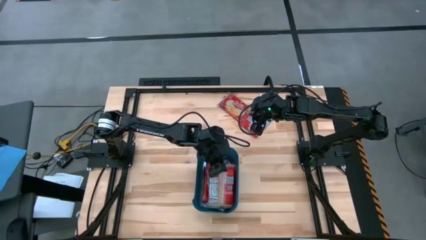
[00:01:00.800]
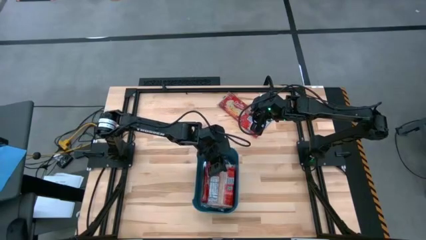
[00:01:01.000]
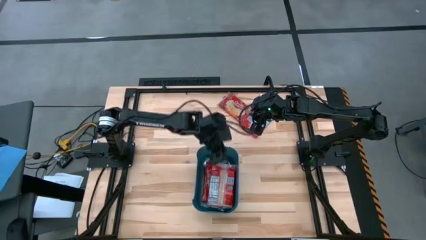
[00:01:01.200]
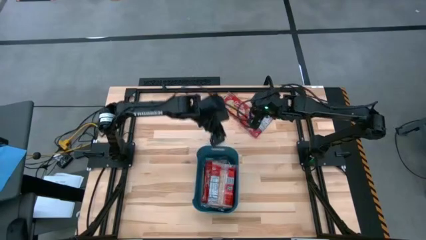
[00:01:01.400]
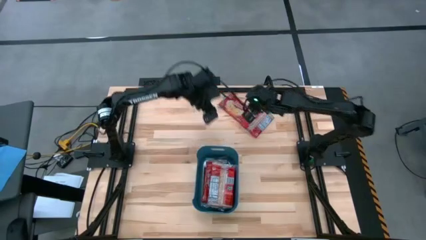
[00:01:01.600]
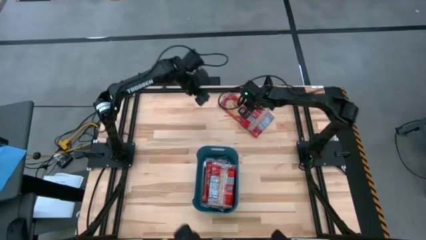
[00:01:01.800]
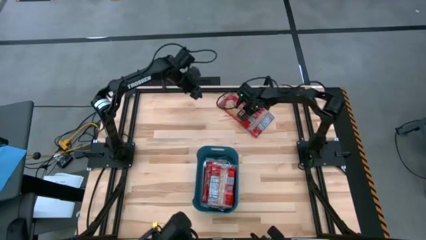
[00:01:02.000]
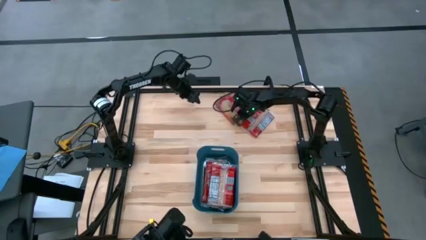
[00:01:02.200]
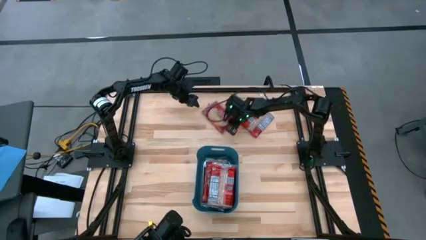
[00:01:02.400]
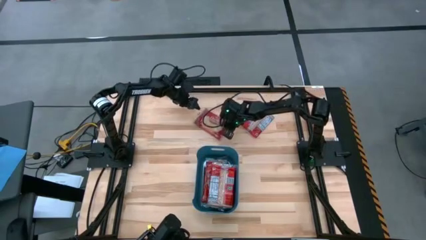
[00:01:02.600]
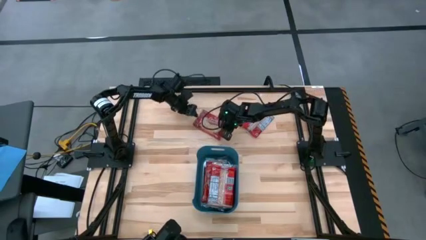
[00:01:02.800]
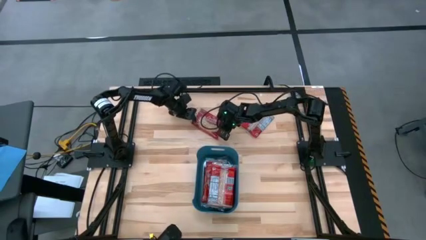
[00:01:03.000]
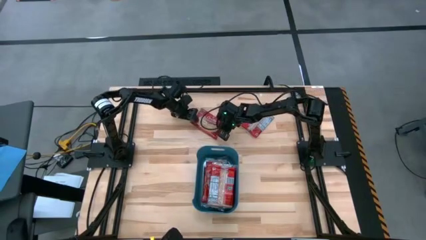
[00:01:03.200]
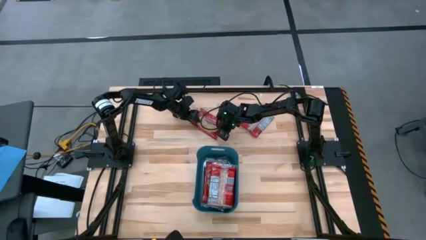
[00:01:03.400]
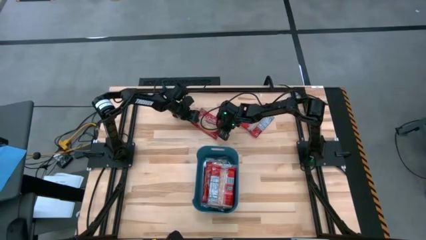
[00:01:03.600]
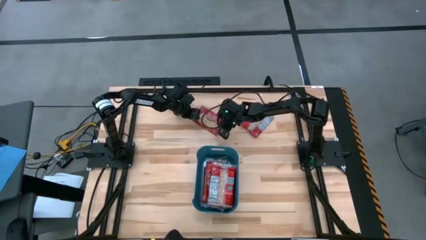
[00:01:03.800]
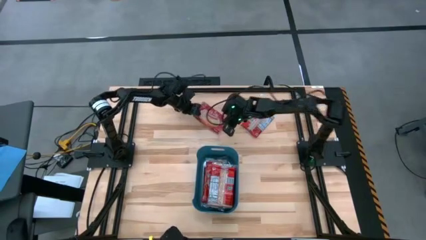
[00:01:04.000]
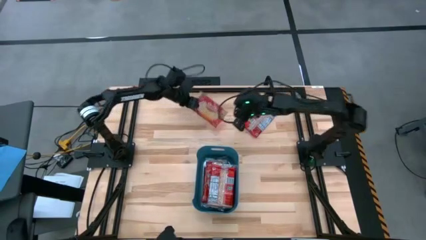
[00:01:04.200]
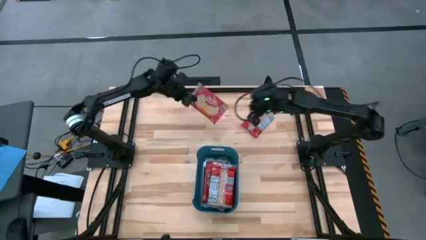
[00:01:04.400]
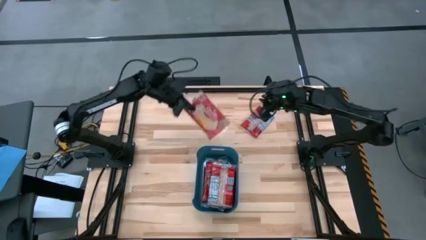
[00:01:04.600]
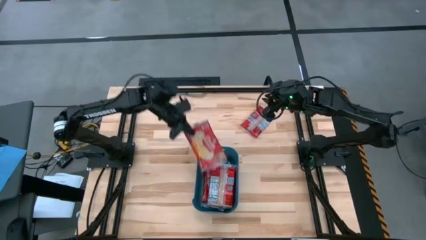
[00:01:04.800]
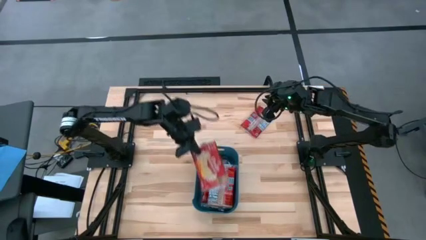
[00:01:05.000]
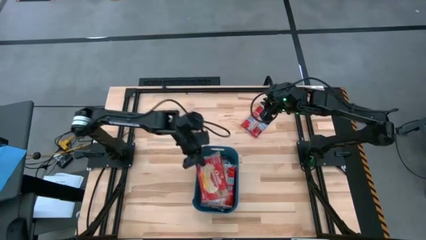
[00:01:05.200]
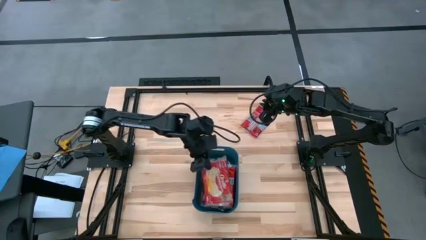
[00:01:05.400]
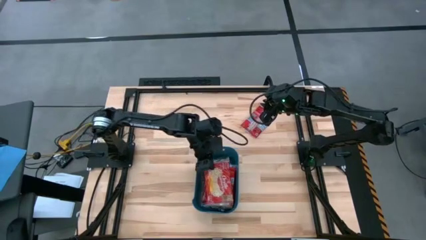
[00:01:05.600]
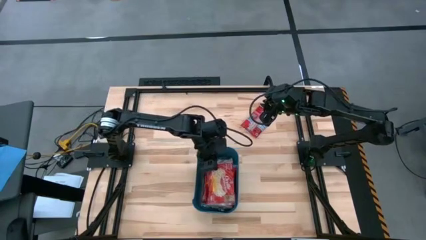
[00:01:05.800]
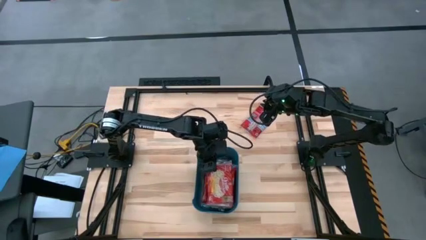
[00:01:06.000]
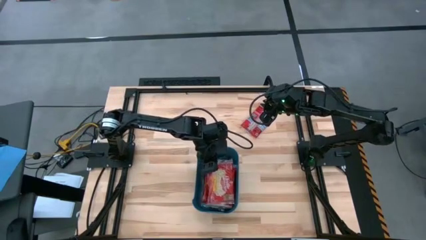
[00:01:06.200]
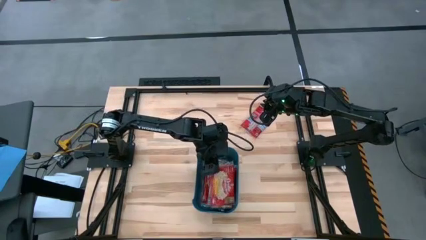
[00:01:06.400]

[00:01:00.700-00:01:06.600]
Task: Sort popcorn bags into baskets
Put the red popcorn pack into the blue container

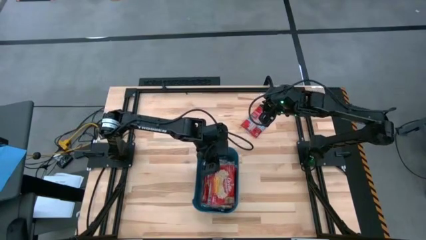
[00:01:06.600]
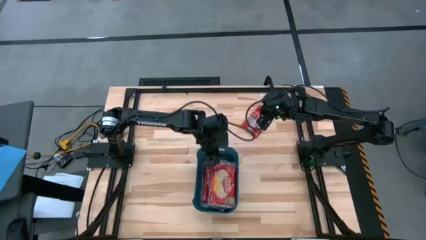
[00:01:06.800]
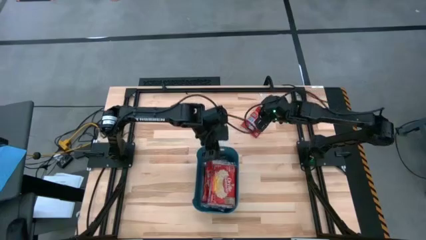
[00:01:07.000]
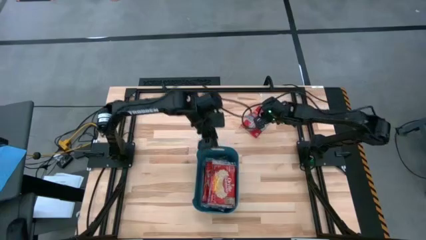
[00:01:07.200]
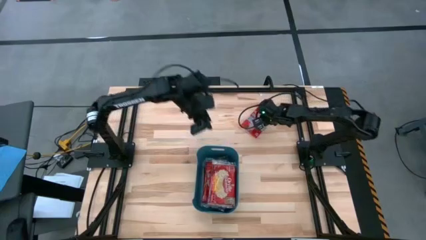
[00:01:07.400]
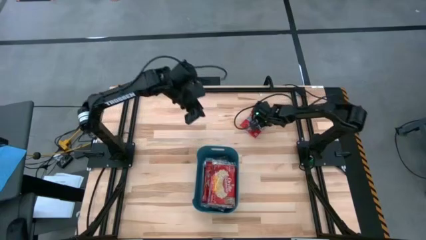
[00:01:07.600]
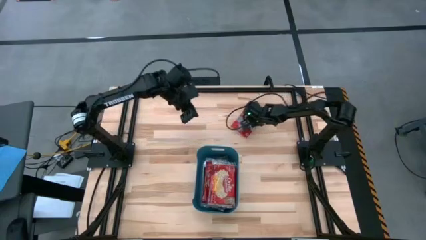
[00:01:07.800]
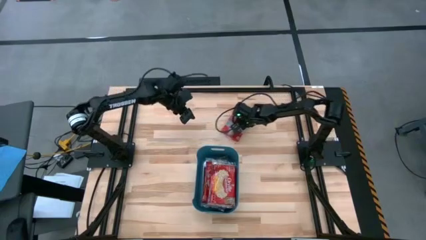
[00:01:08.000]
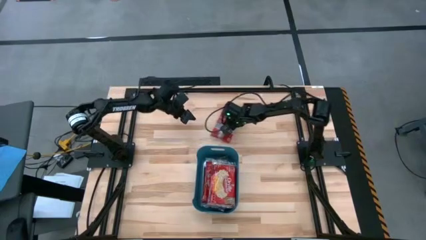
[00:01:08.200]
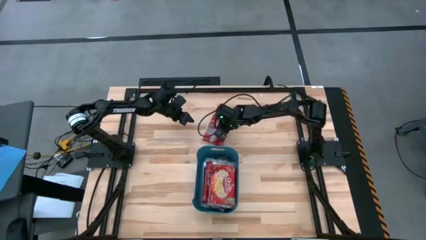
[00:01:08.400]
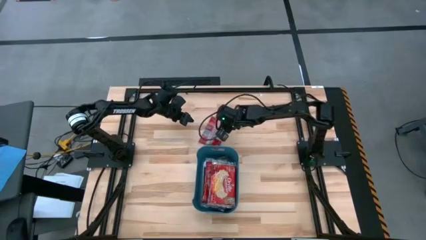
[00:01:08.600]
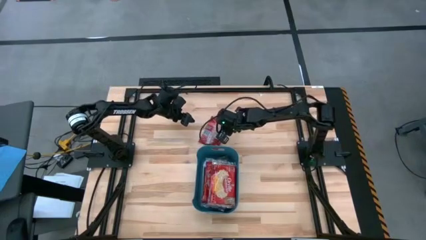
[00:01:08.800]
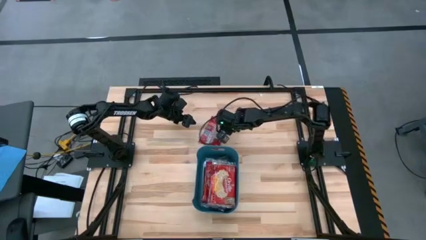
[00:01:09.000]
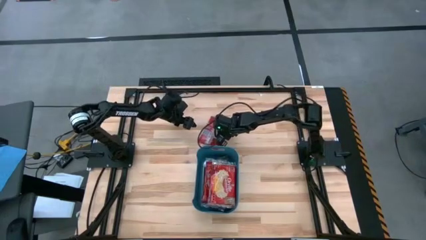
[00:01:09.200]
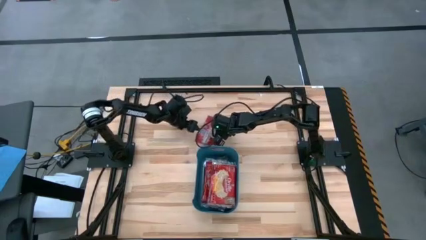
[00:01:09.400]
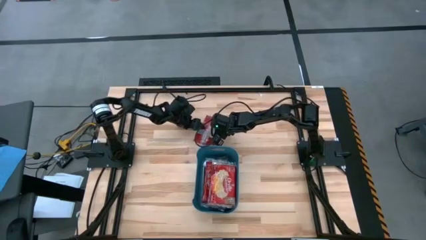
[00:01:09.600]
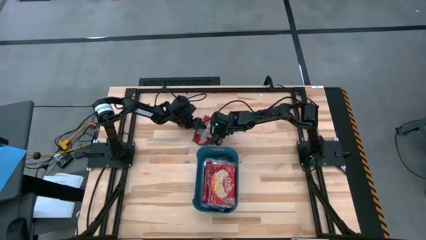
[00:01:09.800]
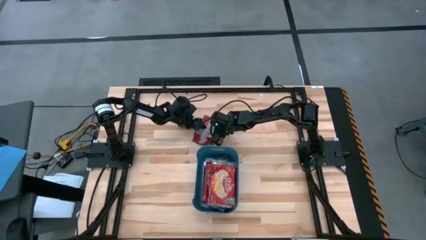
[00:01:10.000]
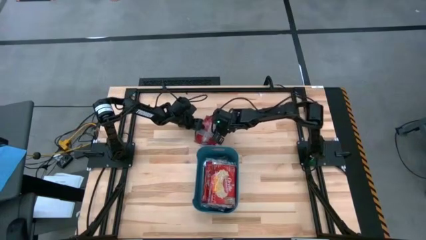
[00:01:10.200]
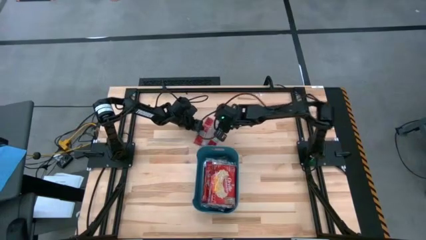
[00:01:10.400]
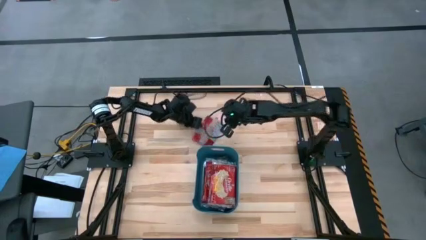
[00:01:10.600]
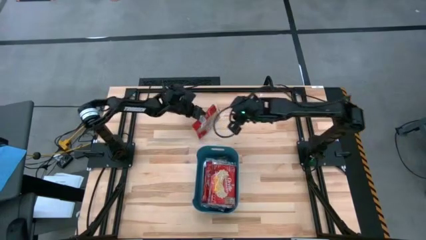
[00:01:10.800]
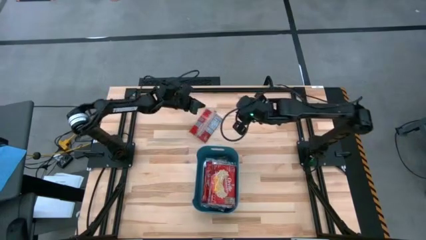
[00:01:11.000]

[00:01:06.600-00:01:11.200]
Put the red popcorn pack into the blue container

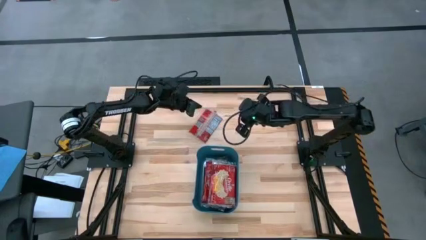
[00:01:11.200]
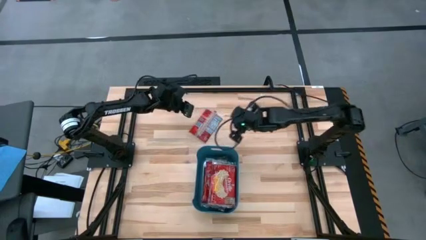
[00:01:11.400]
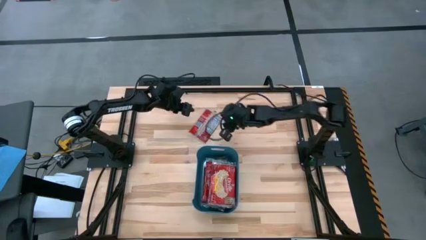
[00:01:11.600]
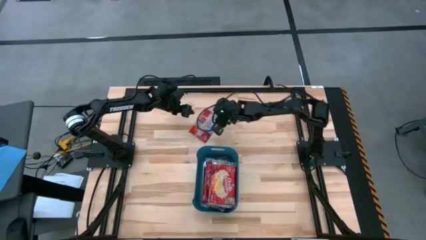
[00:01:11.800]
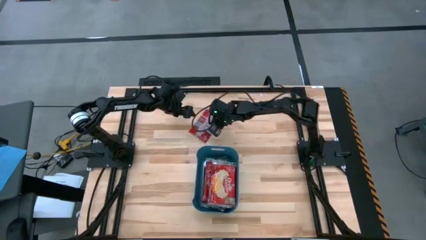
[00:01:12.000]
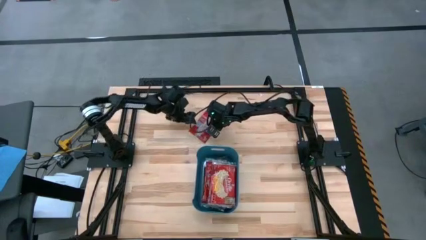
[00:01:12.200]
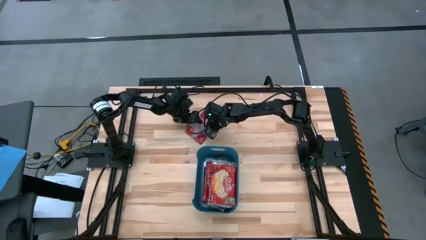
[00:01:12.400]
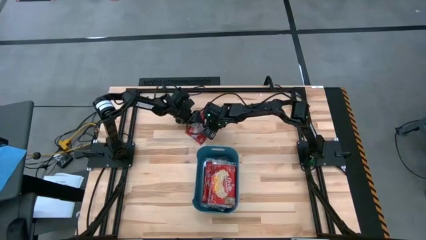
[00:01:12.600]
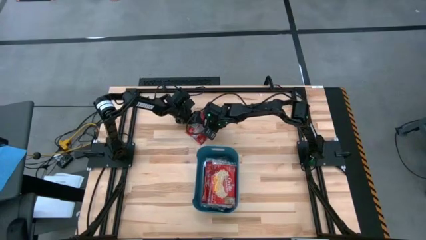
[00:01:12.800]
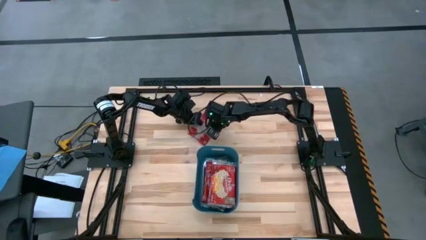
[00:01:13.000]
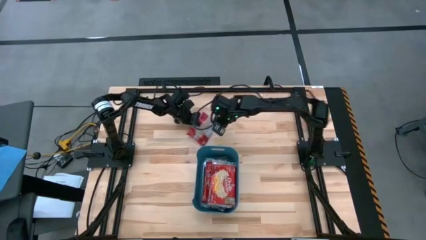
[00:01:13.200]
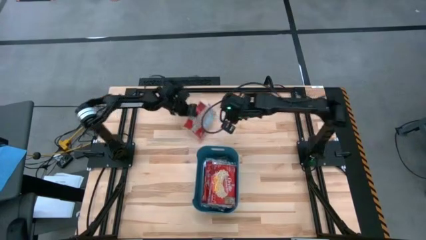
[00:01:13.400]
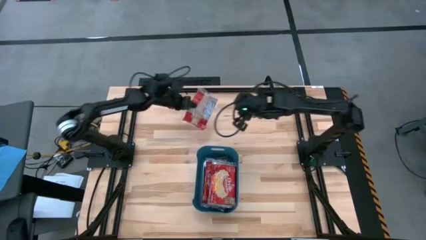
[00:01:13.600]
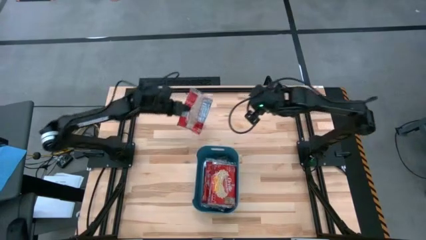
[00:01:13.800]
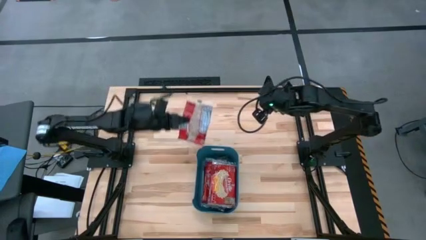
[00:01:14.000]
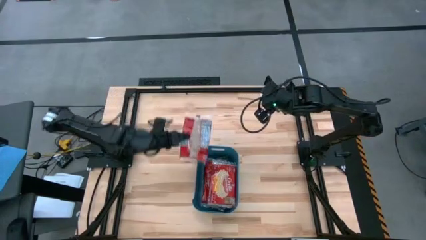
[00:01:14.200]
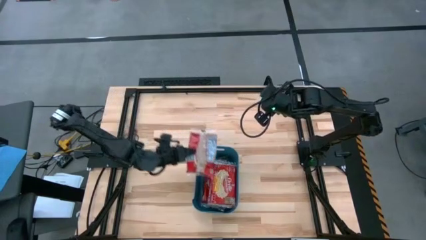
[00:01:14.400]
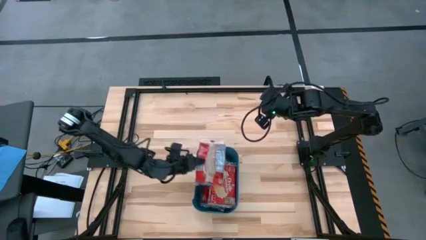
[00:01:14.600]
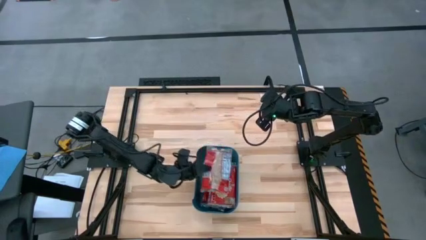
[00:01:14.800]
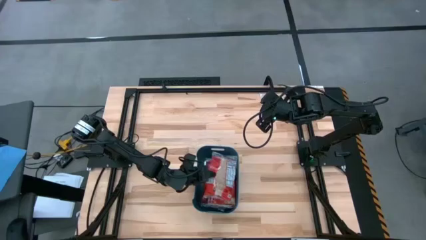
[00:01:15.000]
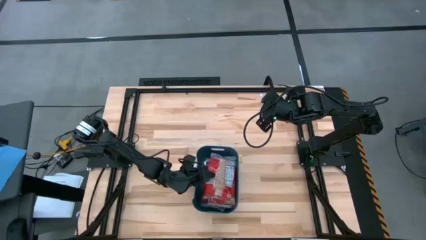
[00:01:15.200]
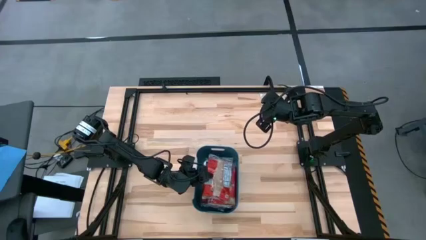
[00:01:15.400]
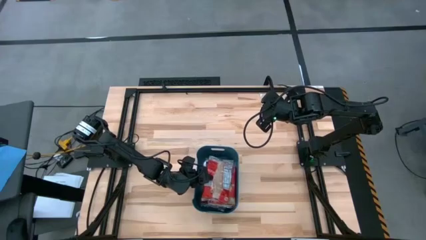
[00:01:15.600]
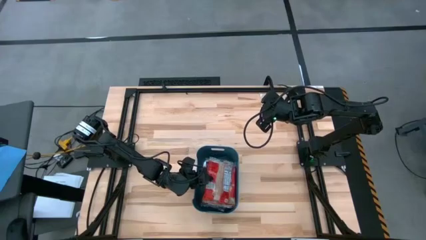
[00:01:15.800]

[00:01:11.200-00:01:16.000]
Put the red popcorn pack into the blue container
